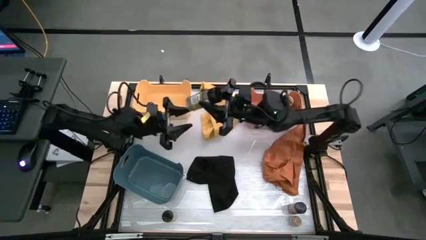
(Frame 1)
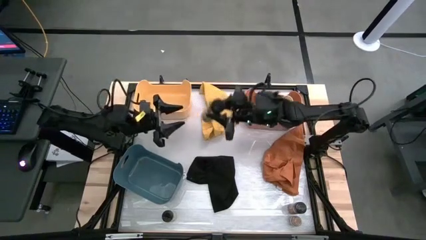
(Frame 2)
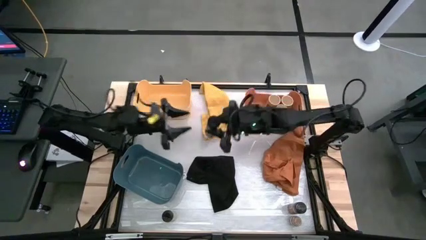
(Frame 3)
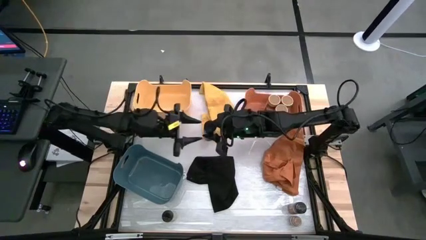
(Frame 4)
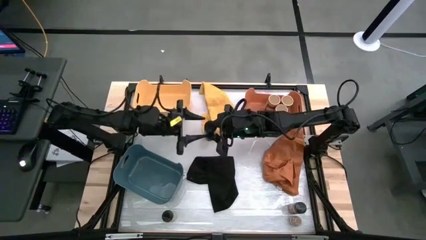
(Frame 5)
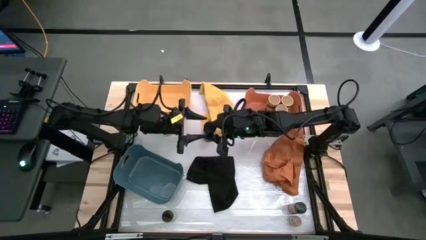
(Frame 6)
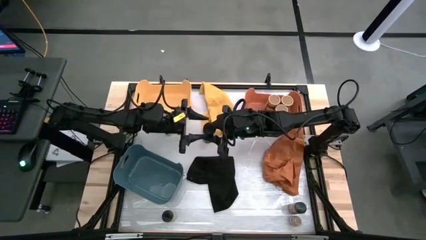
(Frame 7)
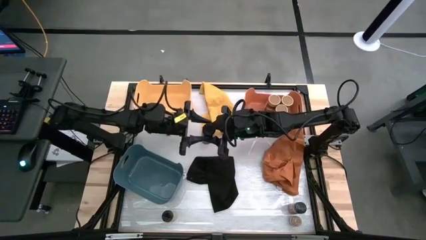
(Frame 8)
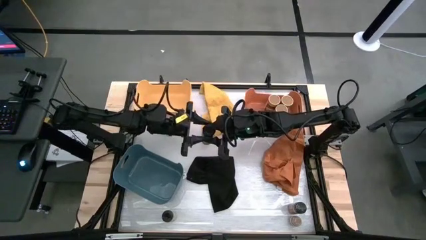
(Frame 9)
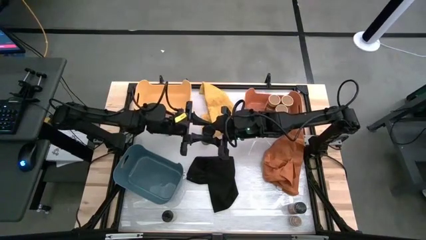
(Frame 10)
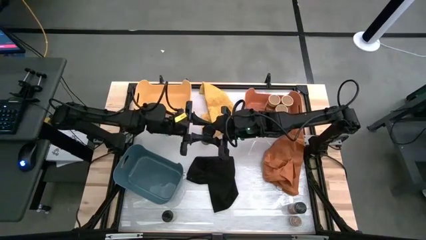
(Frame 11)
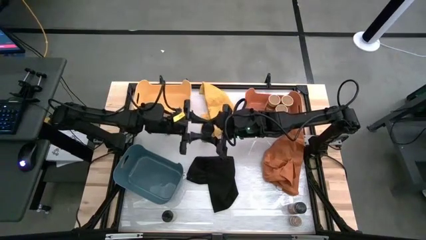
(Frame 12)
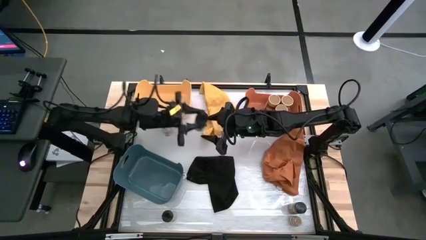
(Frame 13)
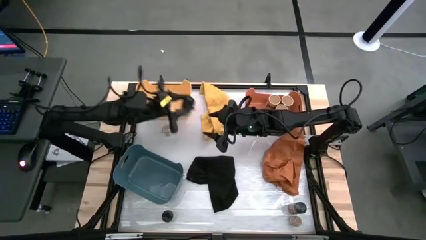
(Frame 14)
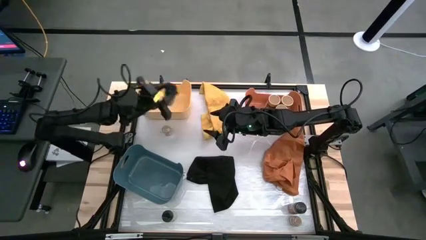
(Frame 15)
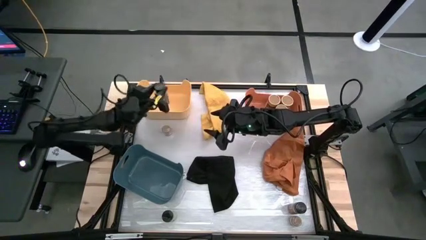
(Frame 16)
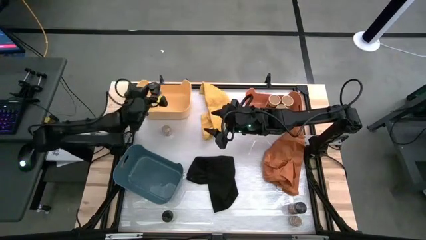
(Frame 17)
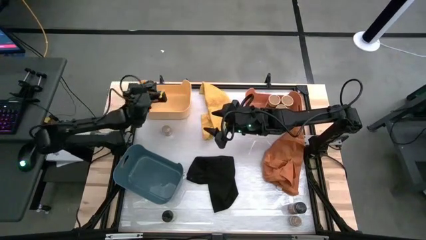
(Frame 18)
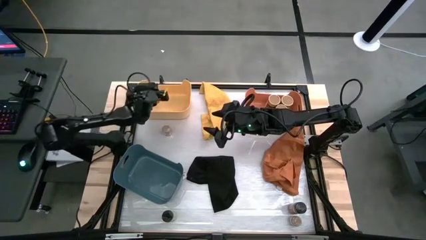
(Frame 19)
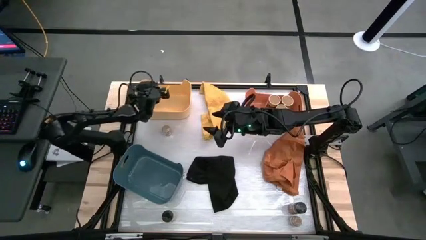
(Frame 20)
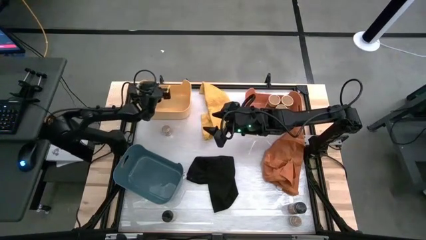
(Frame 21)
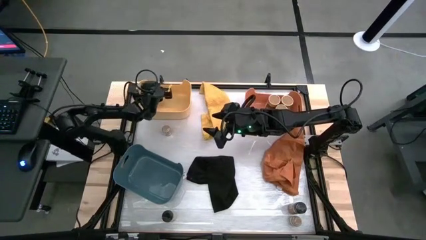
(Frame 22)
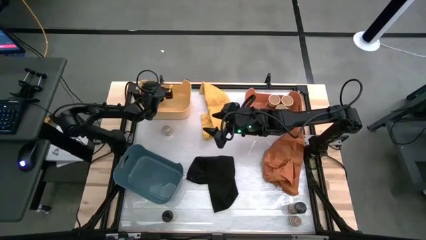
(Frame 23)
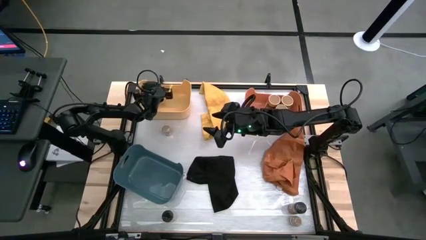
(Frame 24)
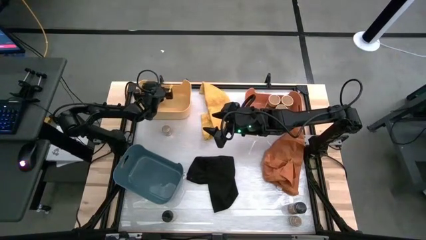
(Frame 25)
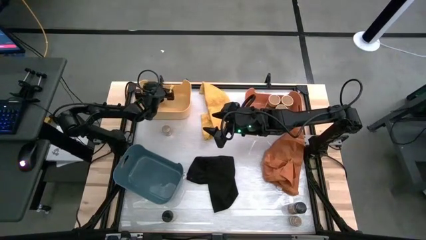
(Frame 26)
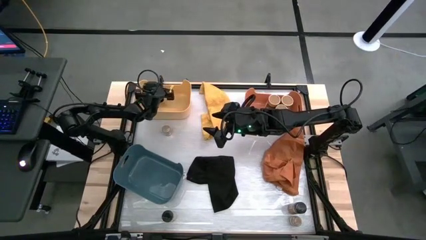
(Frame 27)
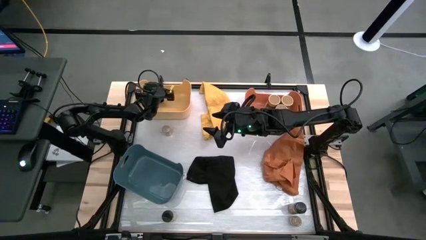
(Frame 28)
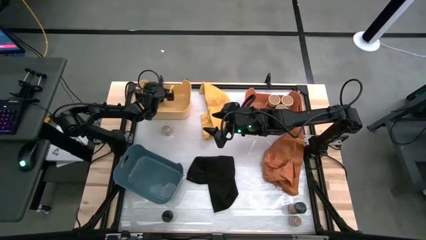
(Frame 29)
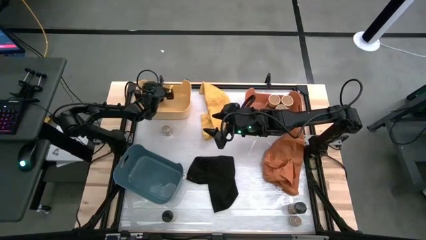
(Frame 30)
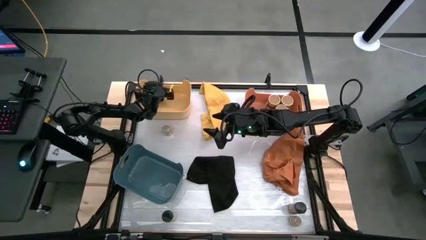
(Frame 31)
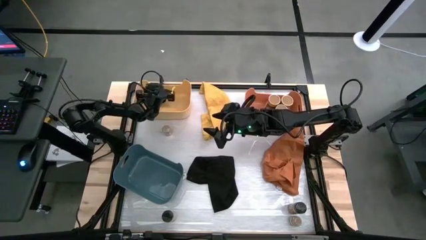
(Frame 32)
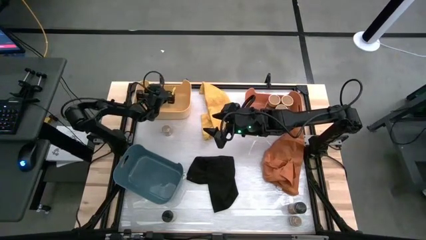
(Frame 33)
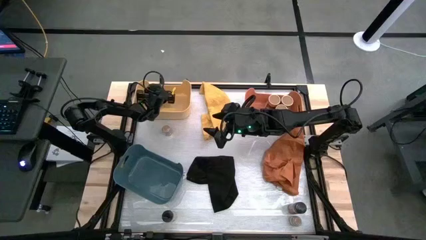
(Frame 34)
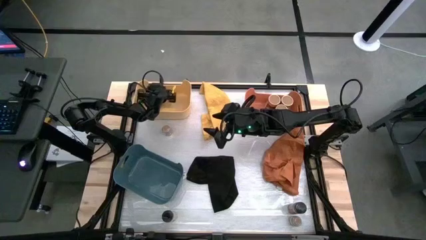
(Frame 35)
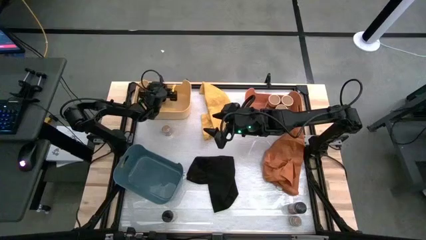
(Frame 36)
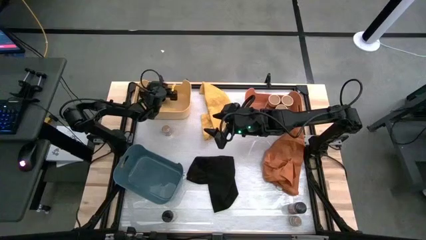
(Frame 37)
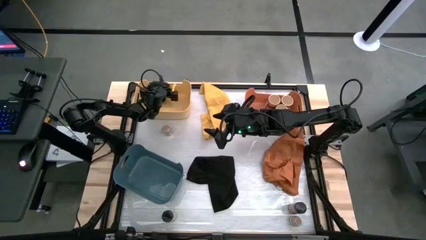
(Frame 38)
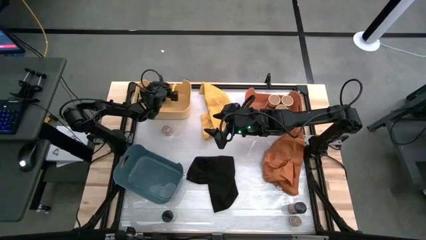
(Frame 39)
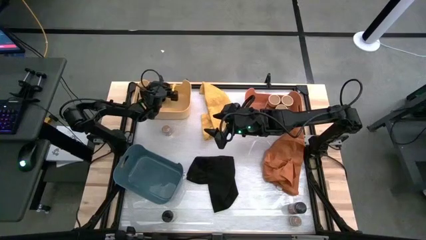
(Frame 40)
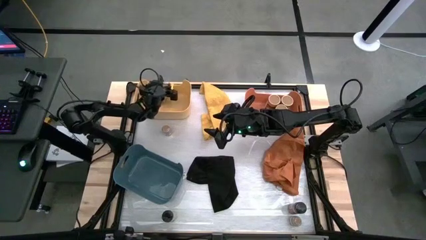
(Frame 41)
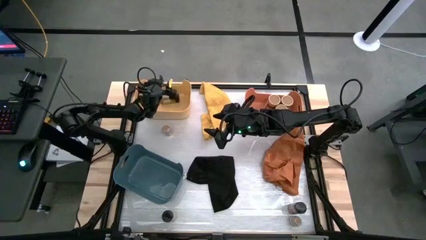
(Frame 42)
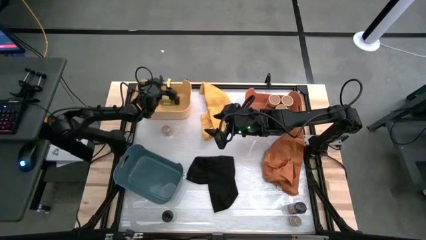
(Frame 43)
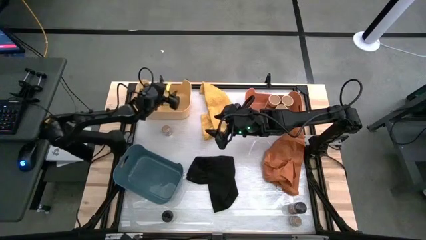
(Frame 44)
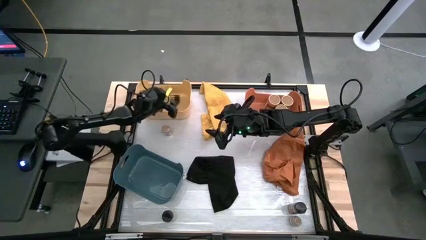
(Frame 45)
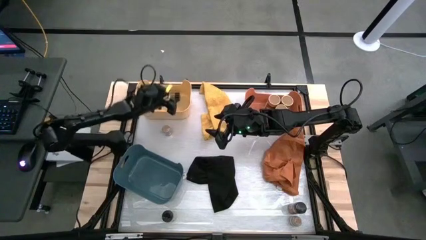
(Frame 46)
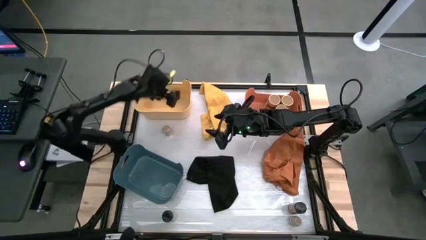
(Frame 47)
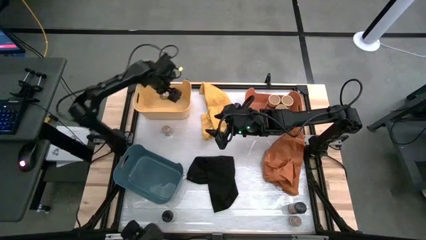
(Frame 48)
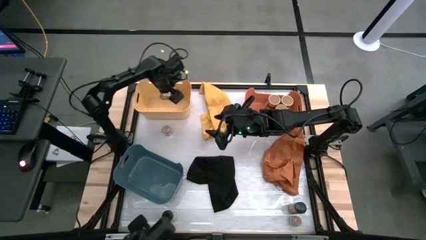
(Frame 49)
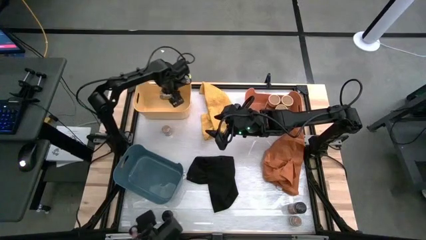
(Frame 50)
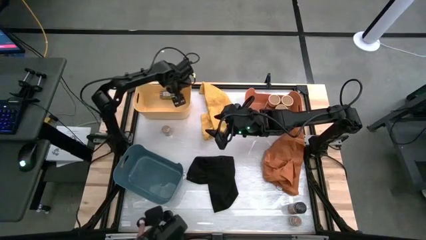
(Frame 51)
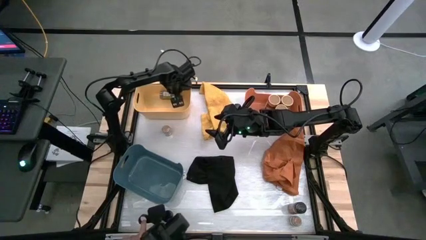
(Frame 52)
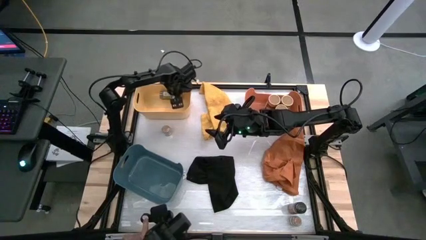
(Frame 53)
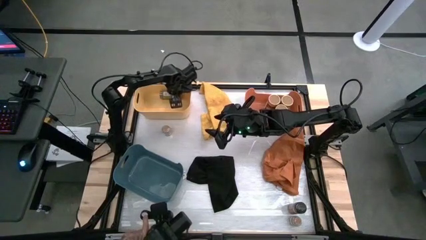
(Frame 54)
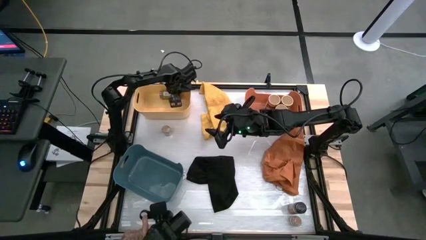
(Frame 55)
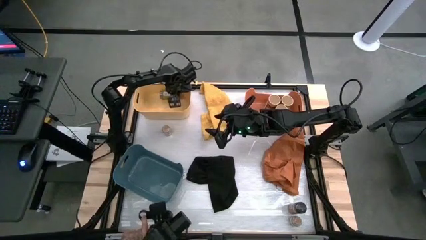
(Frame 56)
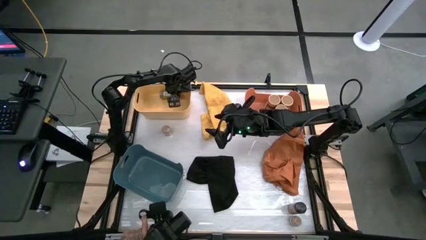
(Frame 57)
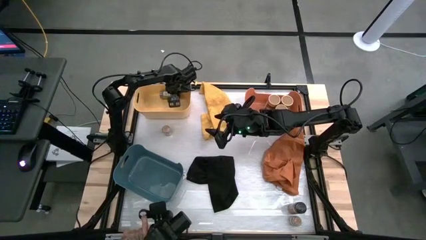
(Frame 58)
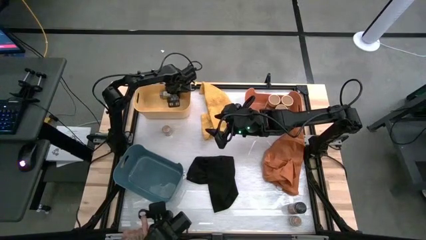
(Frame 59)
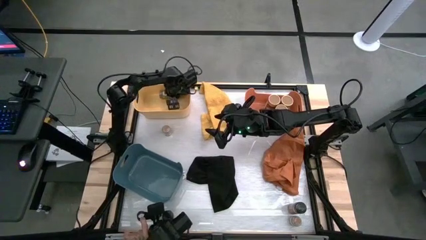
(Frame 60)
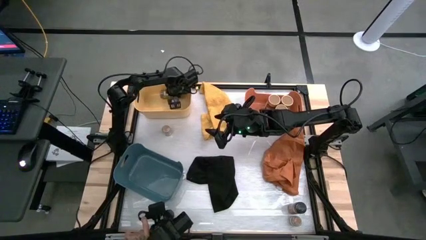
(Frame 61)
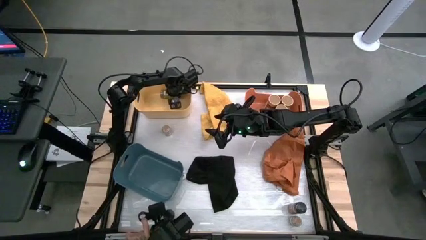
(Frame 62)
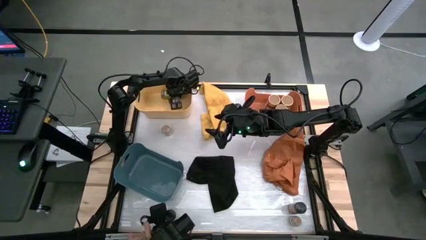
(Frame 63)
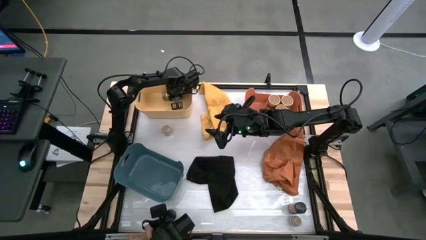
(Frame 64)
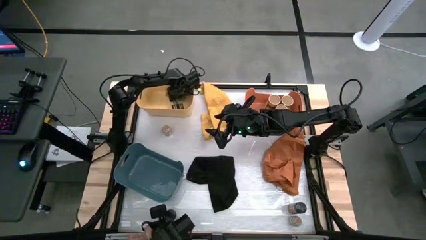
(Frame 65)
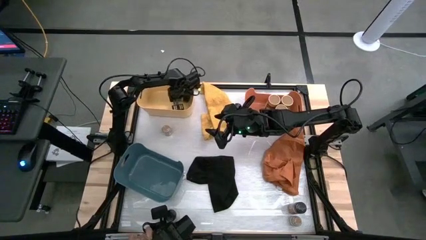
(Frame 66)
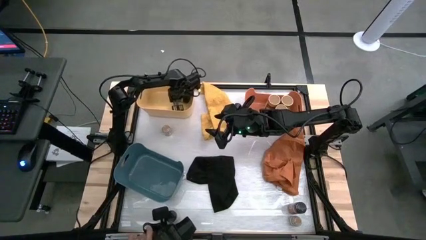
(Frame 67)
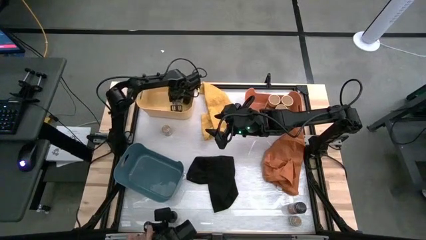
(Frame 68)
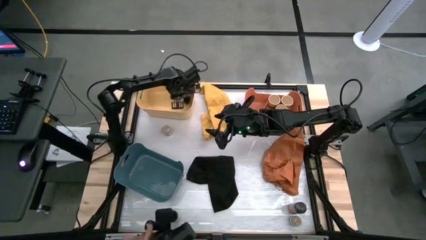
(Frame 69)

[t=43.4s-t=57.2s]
Task: Sort spices by type
Put the top black spice bottle into the yellow bin
